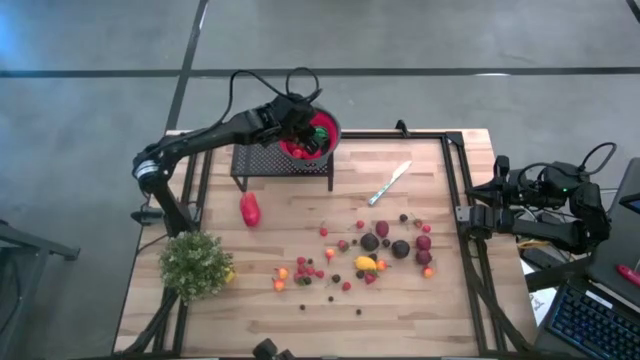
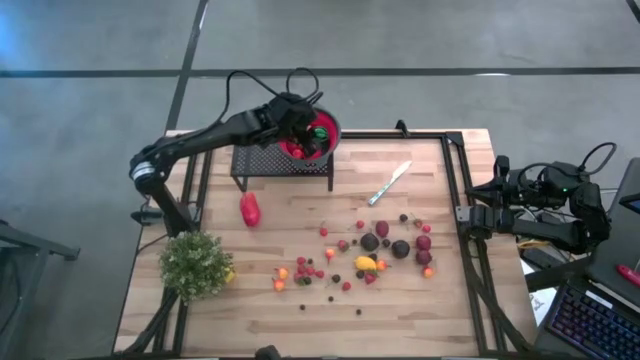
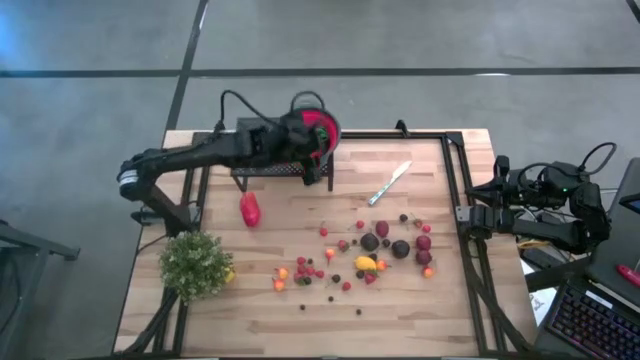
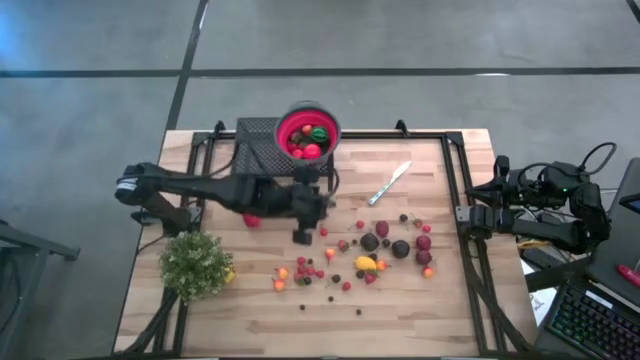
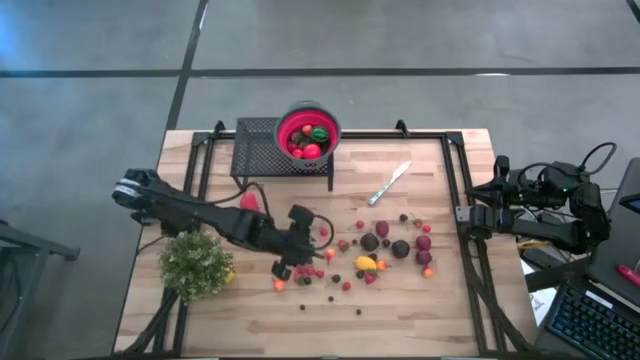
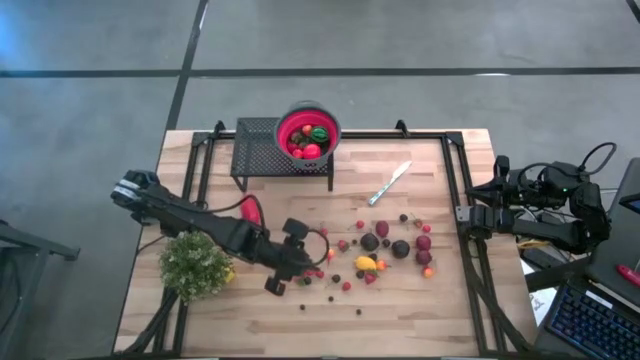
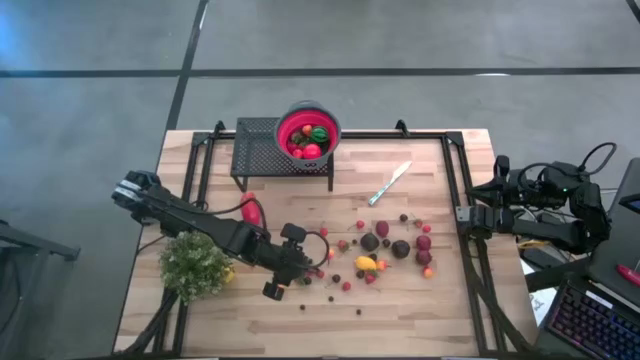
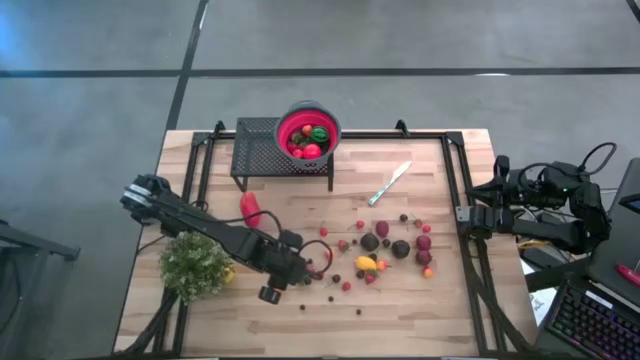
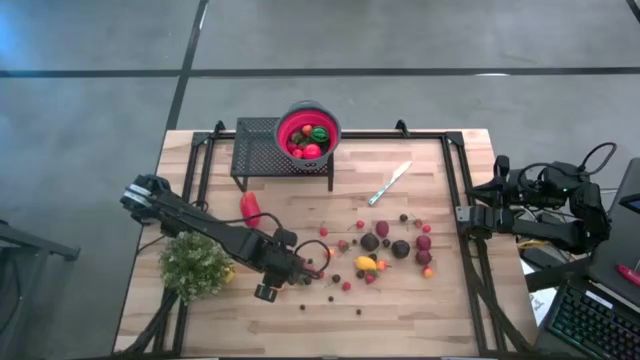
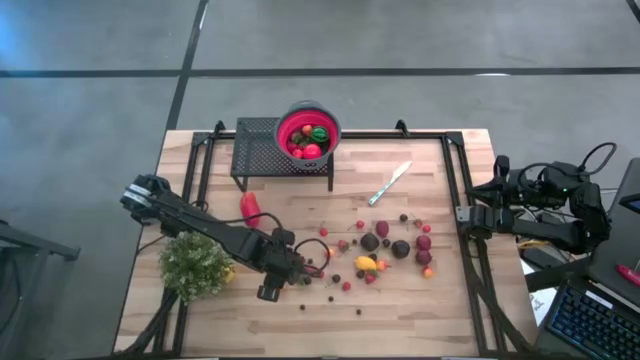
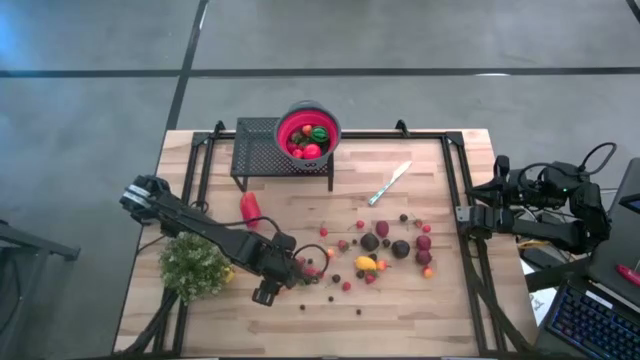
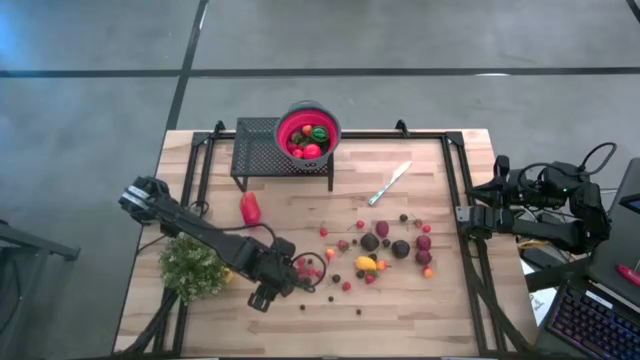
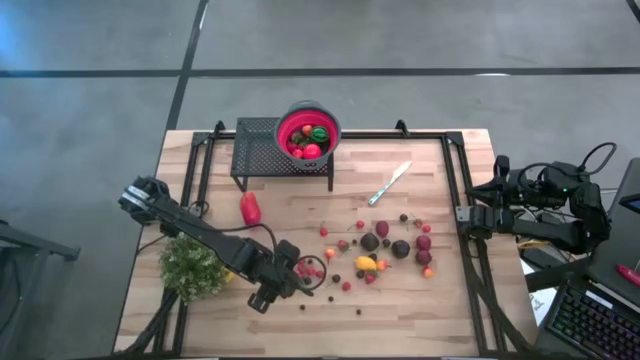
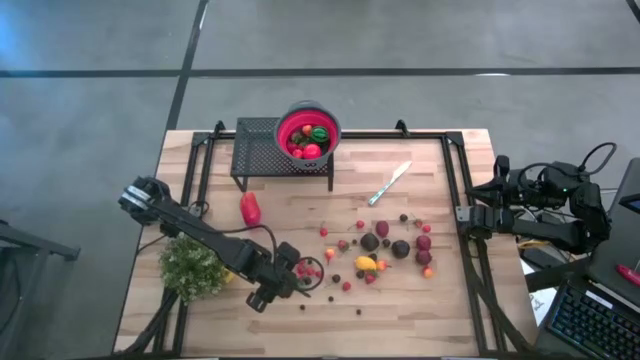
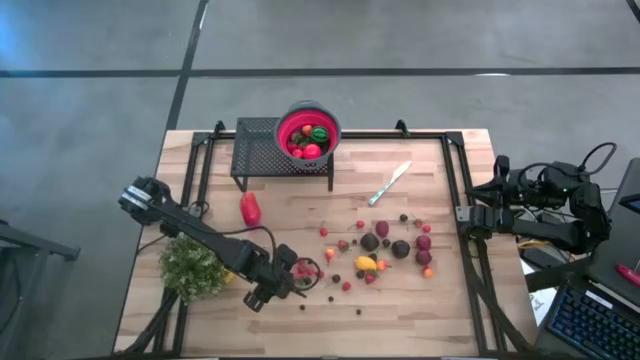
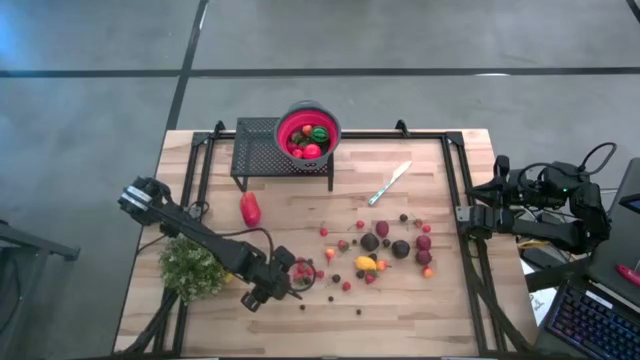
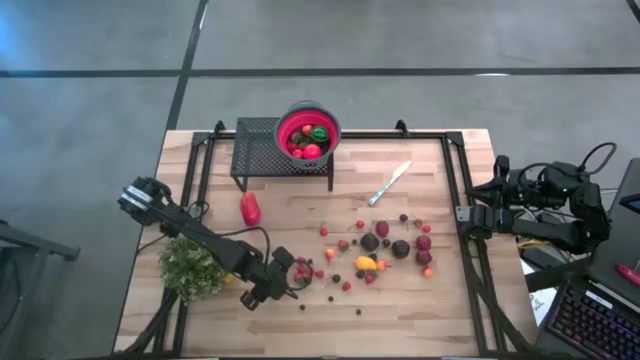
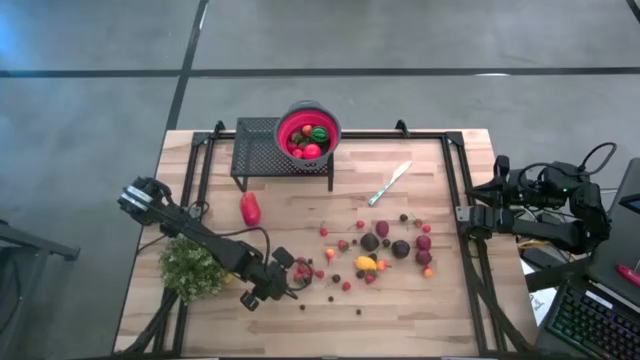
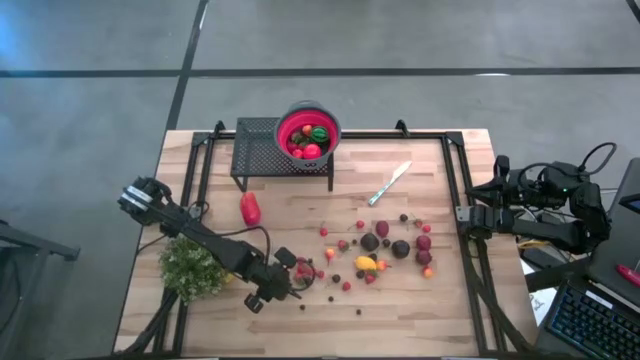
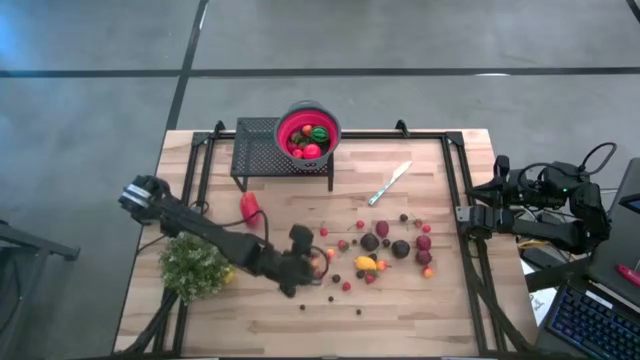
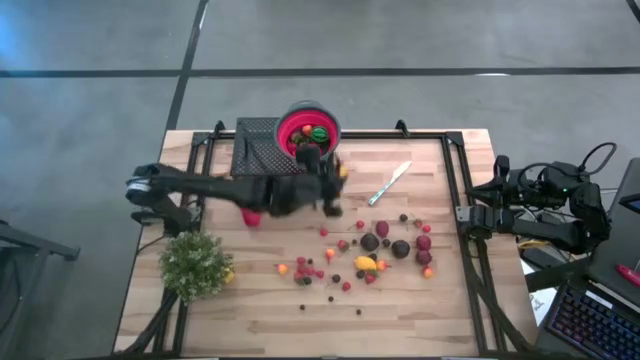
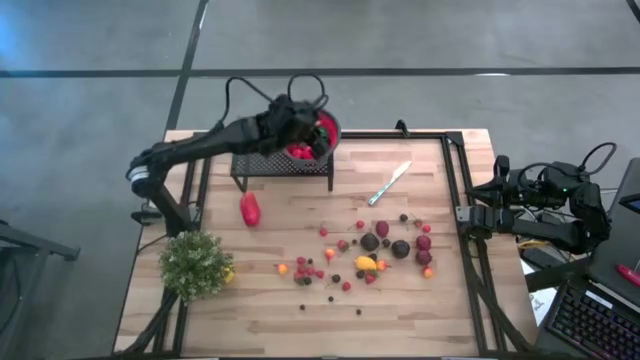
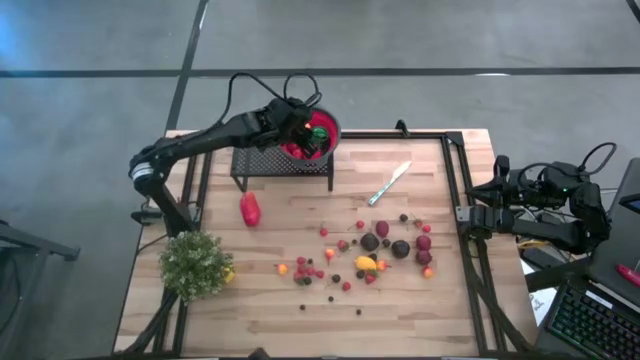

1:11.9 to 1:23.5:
Task: Pick & Place Fruit
Put the orange pear into the red gray strainer bowl on the shelf

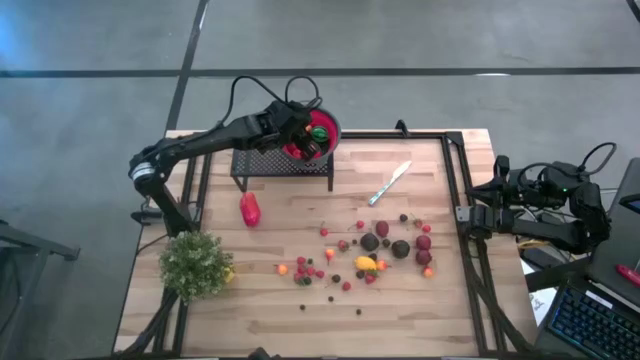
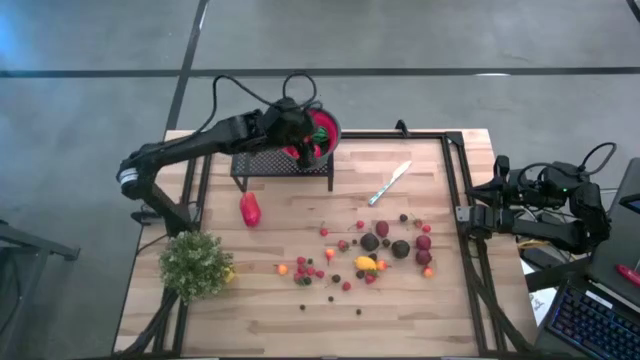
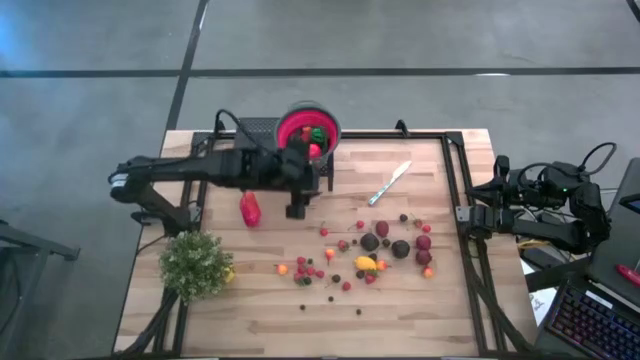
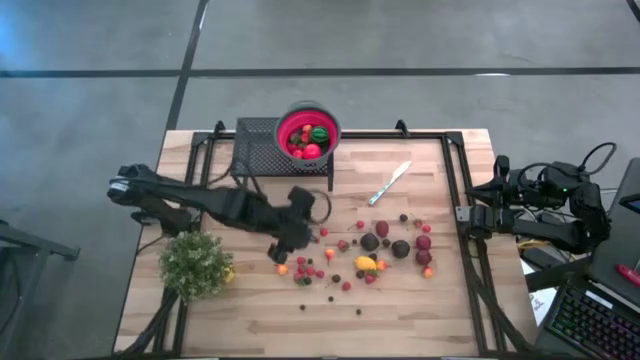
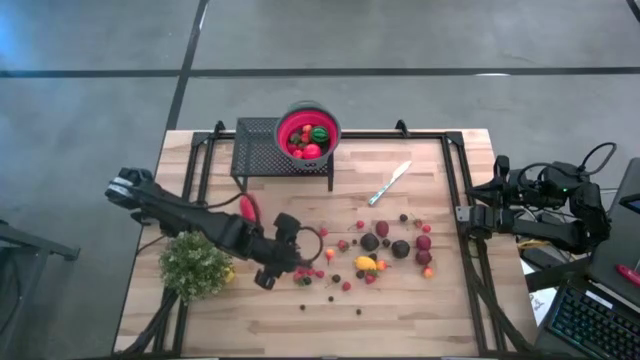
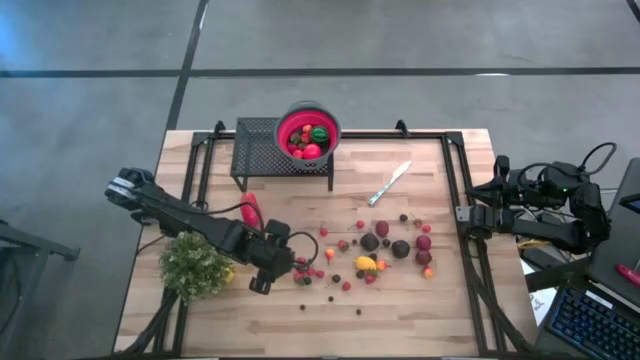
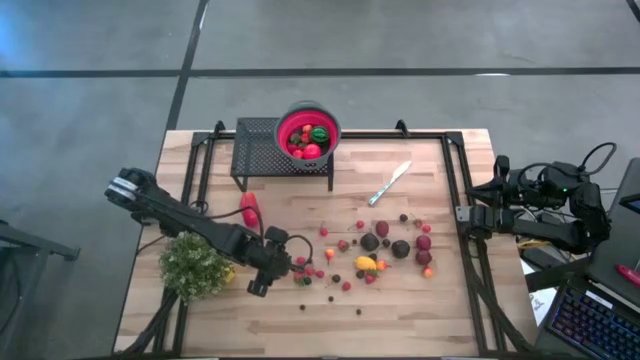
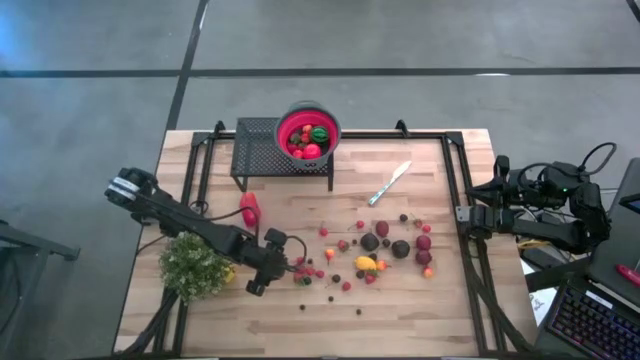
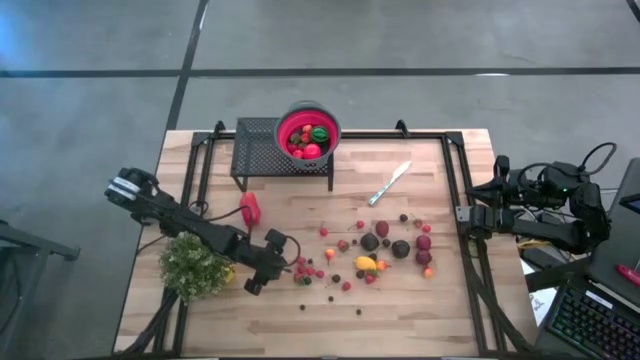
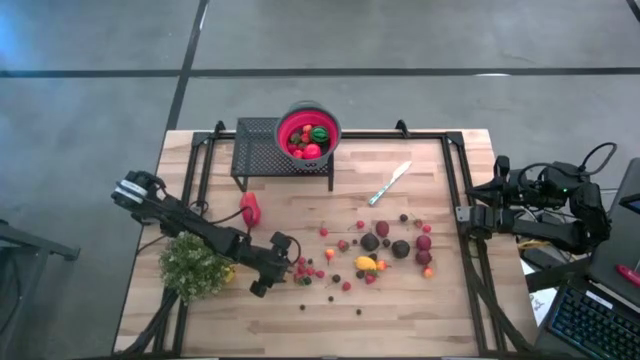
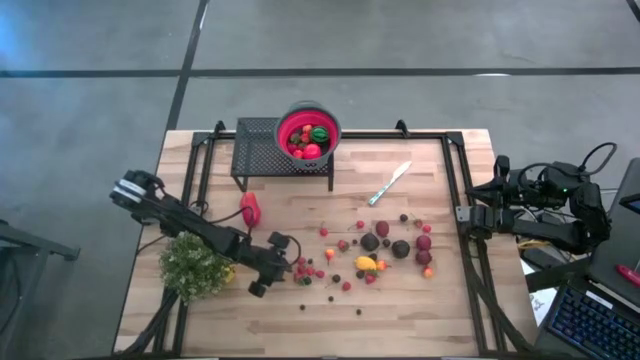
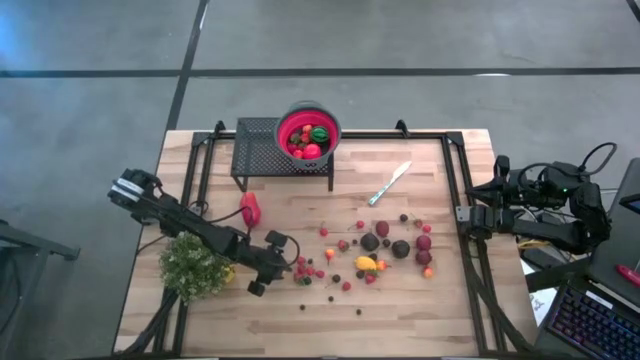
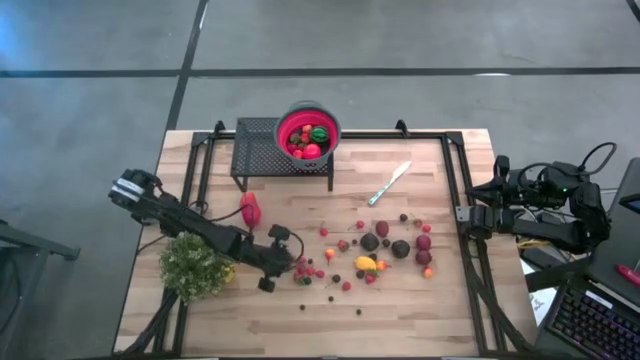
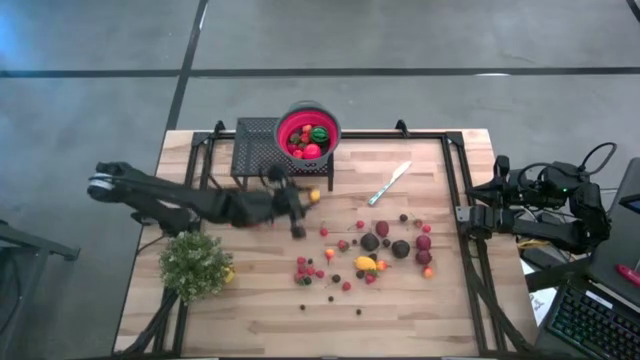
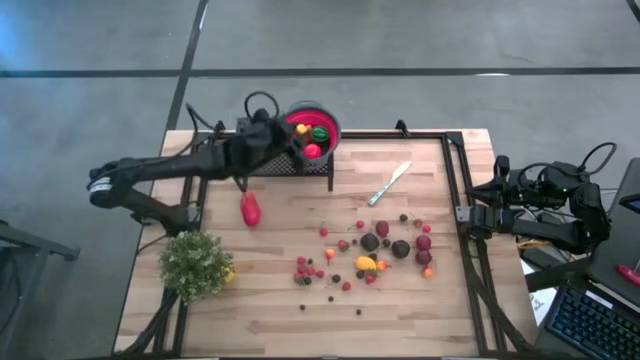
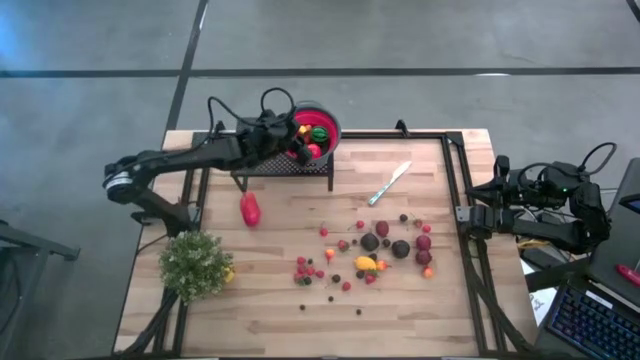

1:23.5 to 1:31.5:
Put the orange pear into the red gray strainer bowl on the shelf
